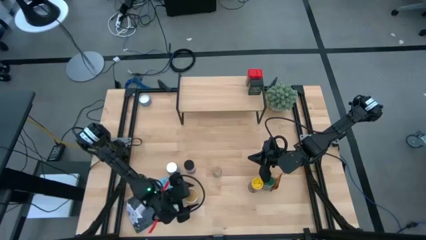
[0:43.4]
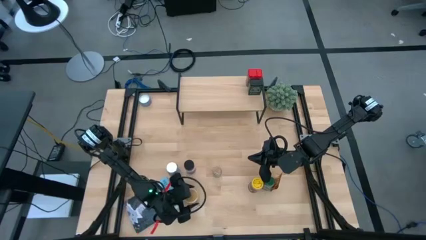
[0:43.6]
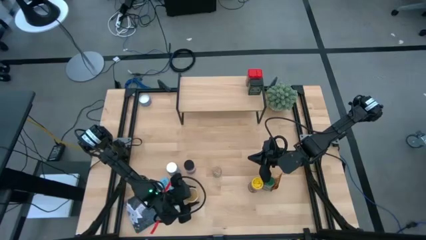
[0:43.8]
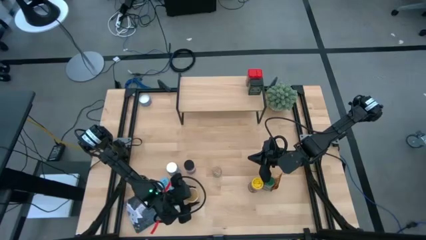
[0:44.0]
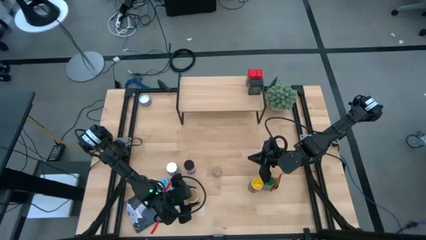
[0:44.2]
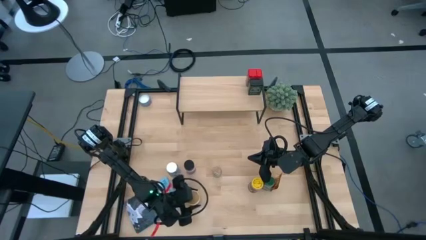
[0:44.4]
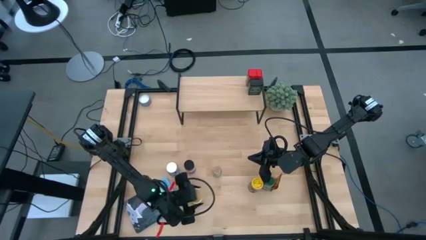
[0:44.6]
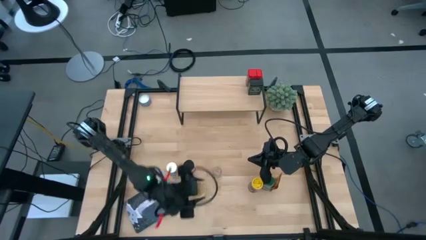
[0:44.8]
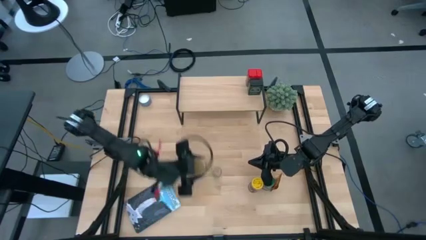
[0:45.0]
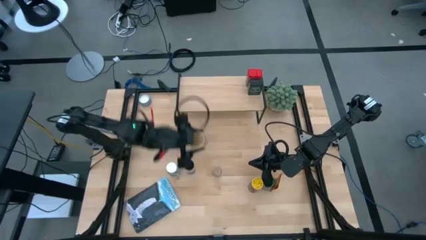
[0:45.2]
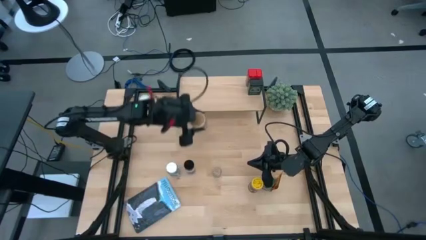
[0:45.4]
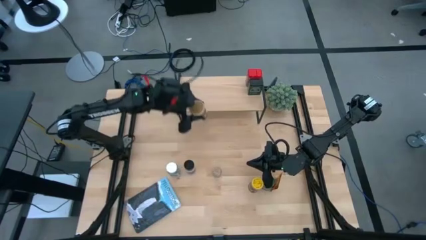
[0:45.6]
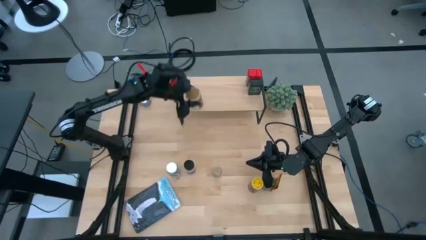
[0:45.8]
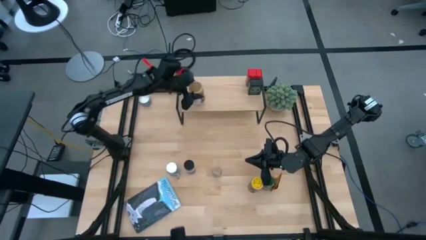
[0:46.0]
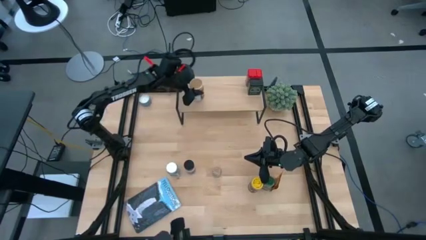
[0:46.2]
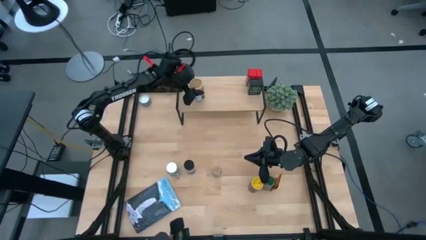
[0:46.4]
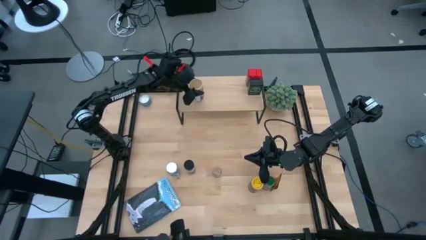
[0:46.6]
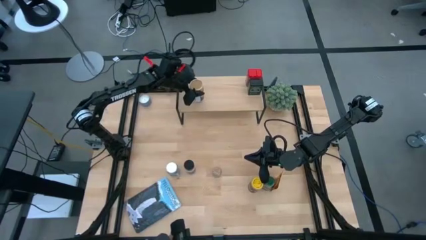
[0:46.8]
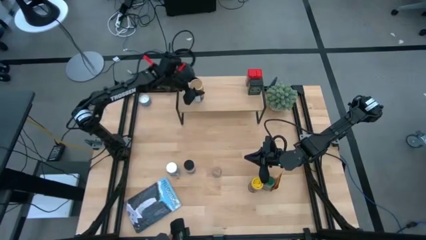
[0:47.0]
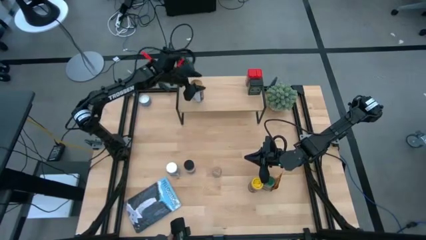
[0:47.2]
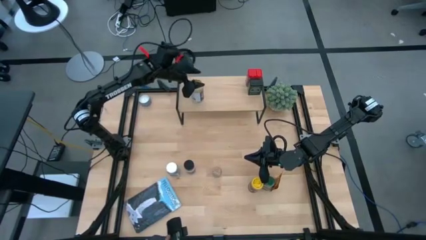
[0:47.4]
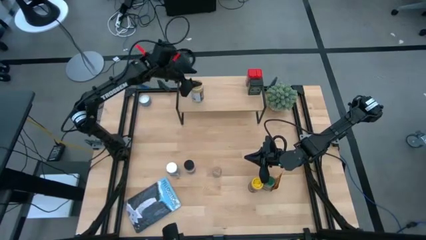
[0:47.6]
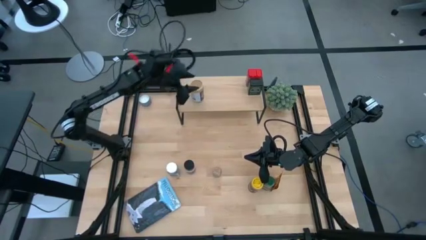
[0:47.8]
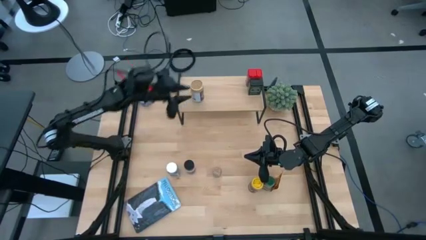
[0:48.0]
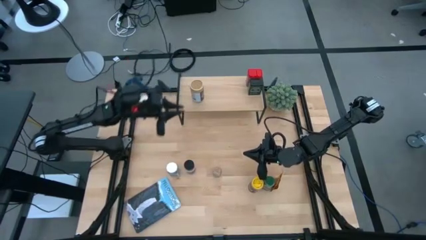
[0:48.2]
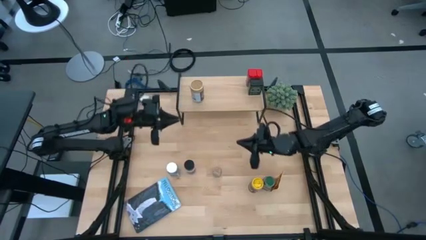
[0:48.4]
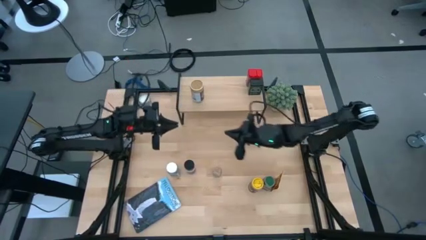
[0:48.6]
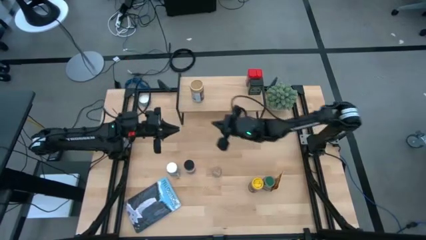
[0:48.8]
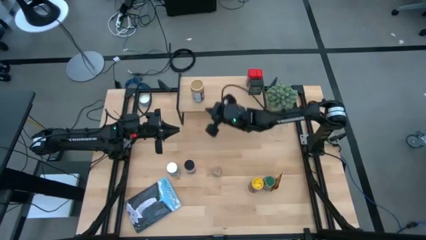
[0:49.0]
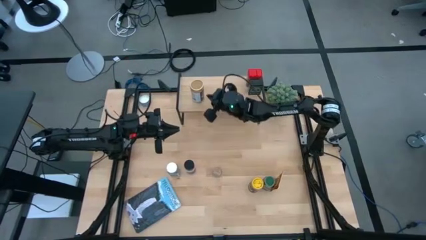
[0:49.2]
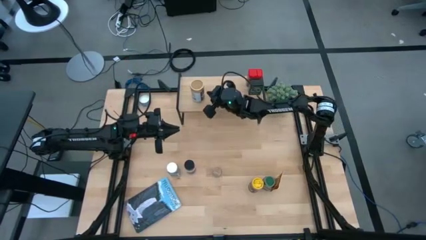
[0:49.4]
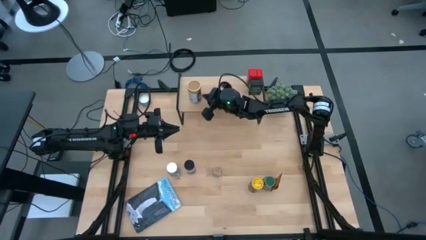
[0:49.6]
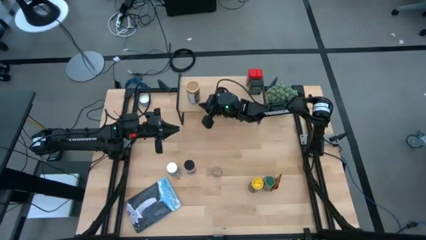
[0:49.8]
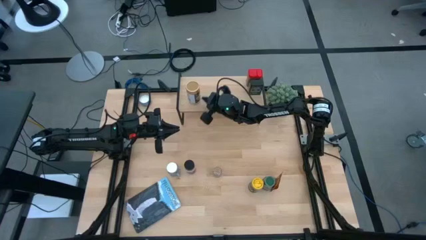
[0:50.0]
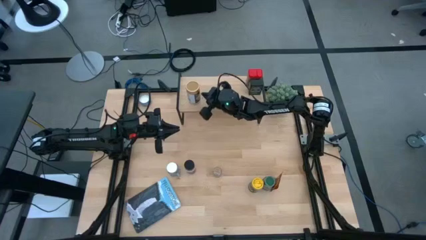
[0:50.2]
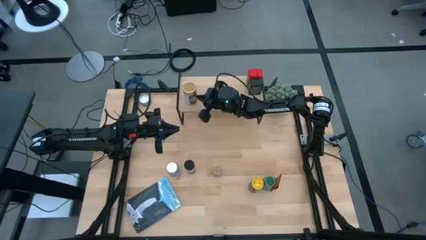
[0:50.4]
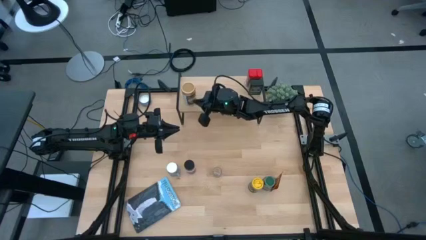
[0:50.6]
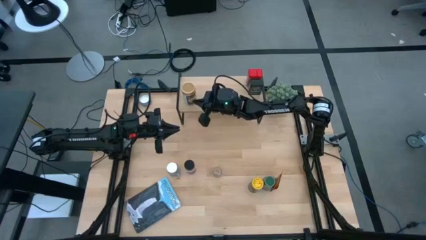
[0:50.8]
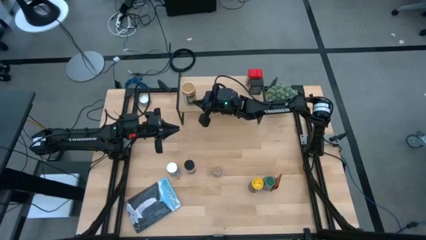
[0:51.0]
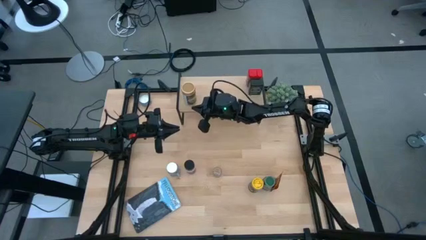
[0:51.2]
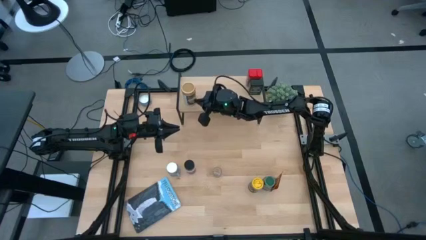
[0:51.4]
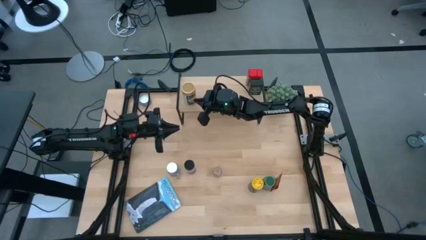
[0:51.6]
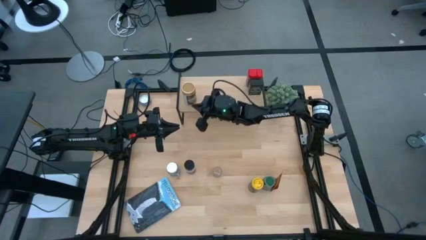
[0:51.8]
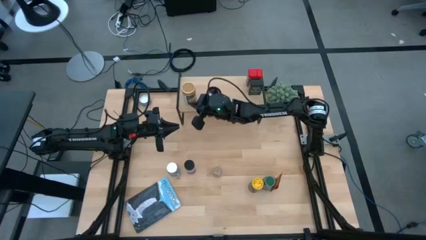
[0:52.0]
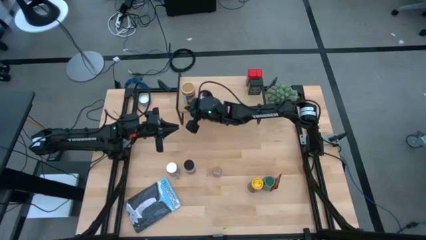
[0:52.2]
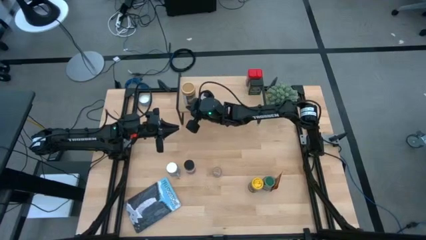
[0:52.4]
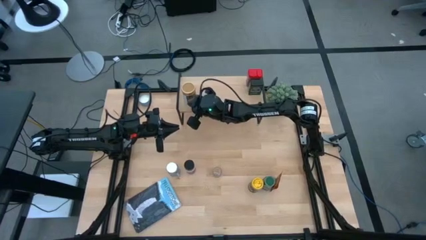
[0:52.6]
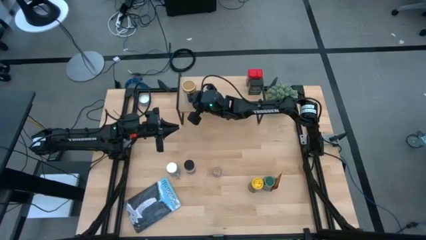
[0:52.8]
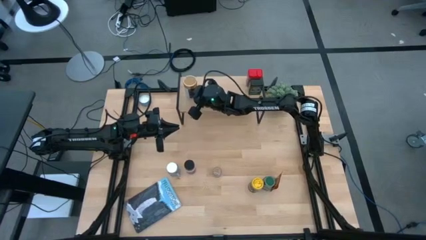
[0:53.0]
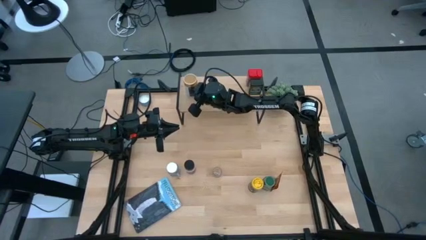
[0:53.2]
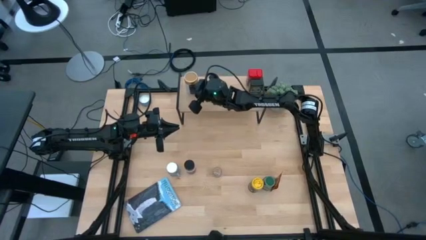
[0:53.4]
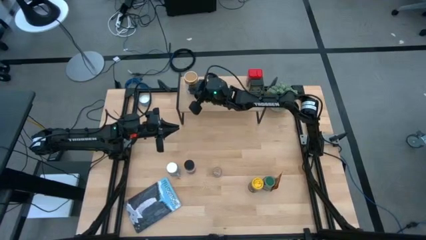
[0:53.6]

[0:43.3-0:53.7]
Task: Shelf spices
Put the gold seasoning bottle on the shelf

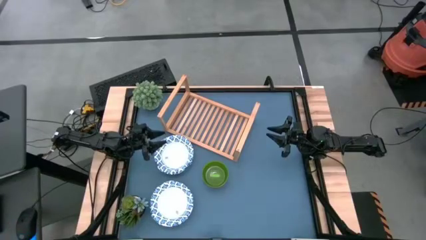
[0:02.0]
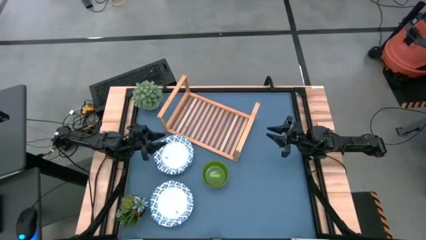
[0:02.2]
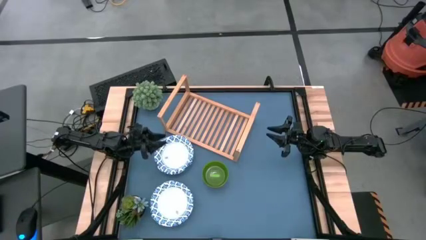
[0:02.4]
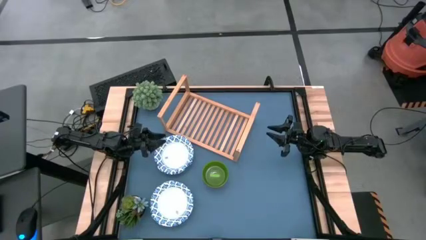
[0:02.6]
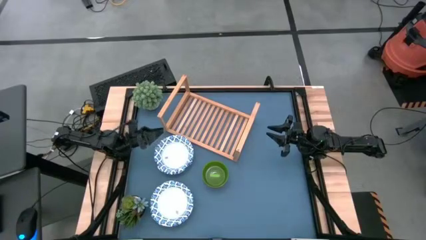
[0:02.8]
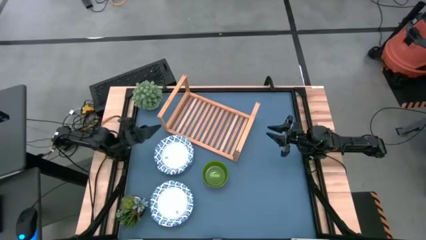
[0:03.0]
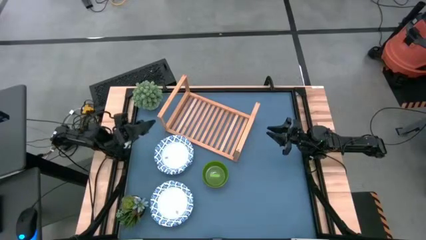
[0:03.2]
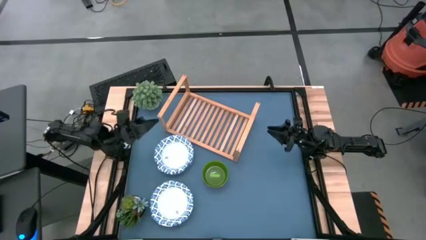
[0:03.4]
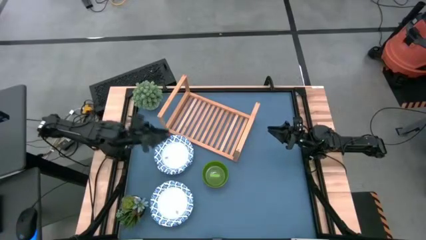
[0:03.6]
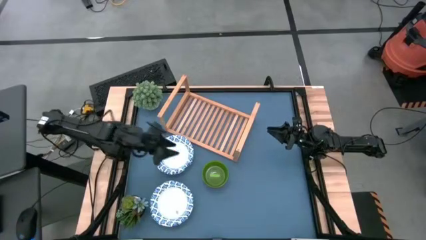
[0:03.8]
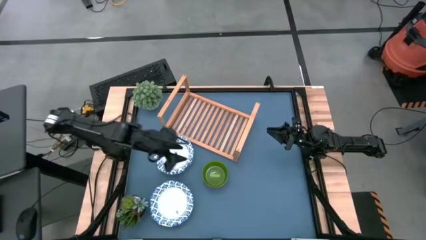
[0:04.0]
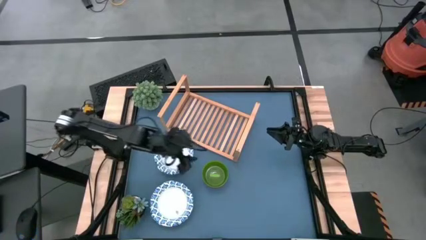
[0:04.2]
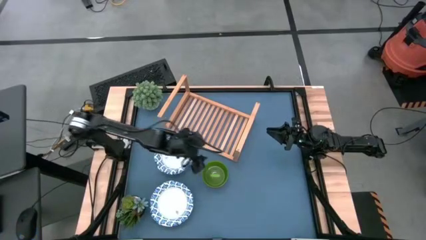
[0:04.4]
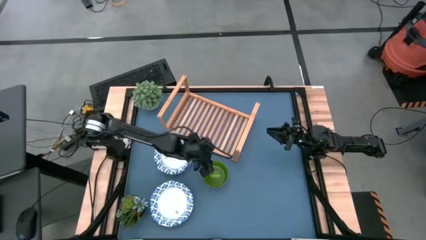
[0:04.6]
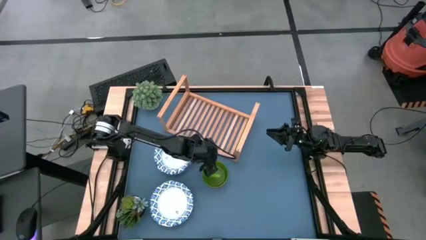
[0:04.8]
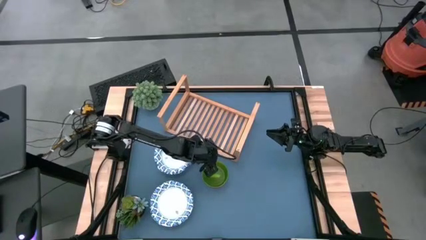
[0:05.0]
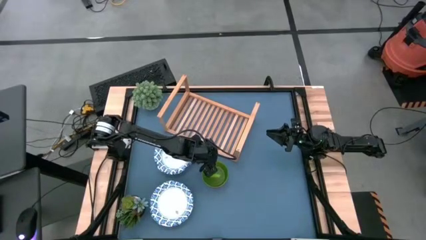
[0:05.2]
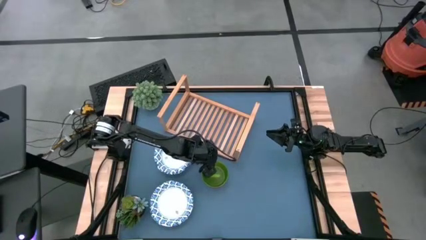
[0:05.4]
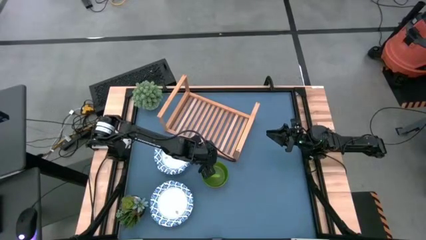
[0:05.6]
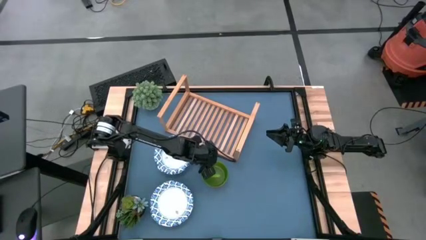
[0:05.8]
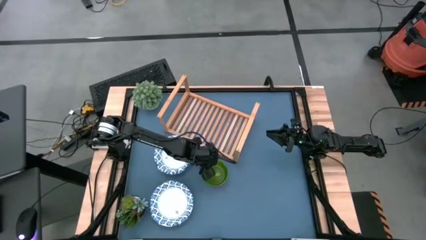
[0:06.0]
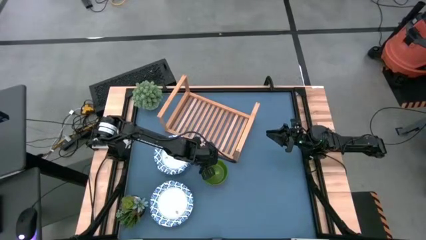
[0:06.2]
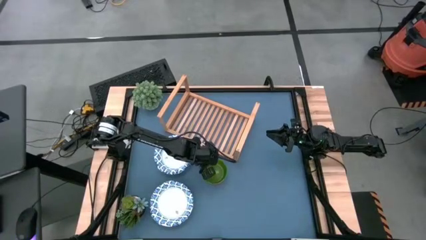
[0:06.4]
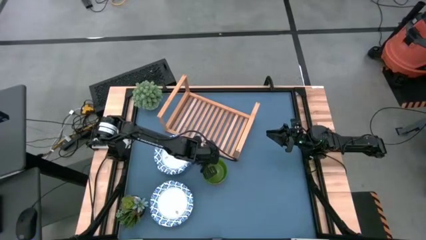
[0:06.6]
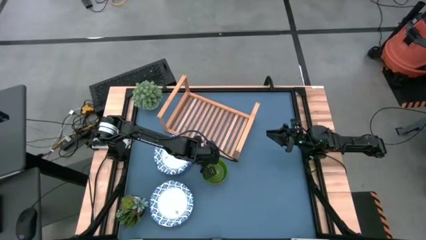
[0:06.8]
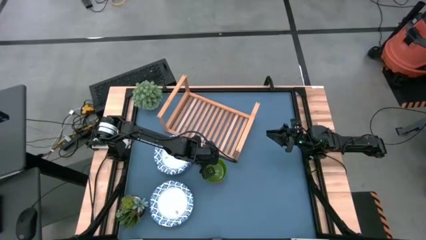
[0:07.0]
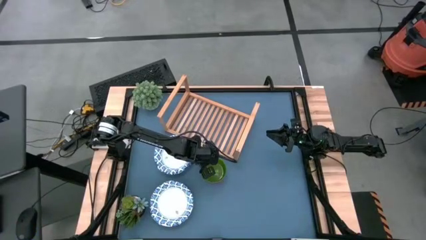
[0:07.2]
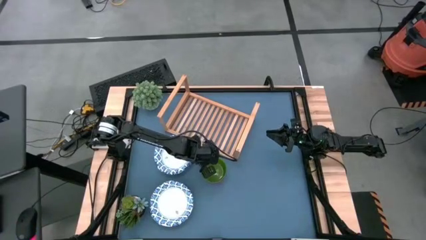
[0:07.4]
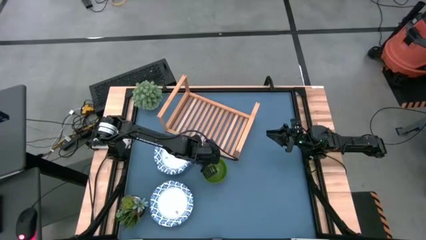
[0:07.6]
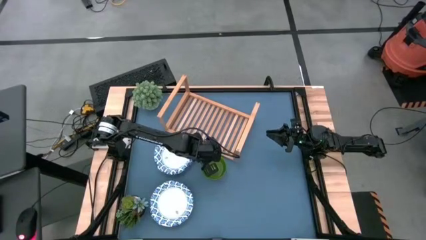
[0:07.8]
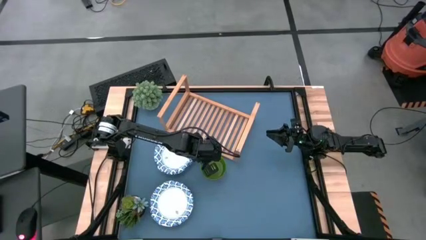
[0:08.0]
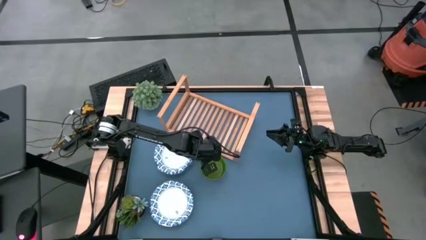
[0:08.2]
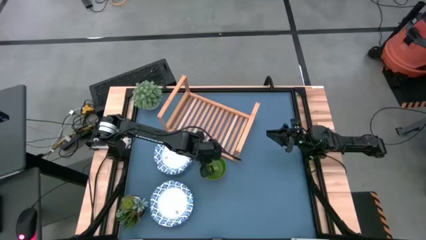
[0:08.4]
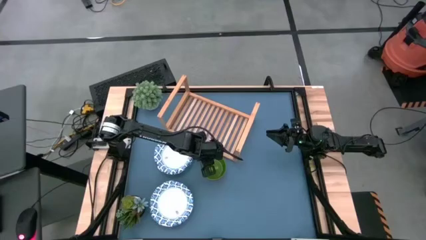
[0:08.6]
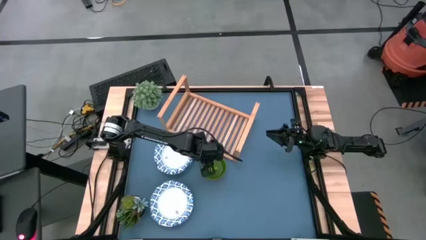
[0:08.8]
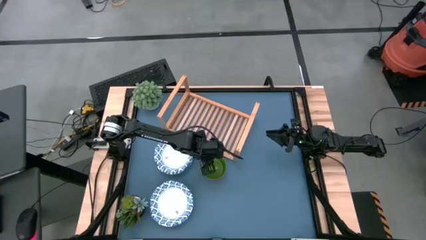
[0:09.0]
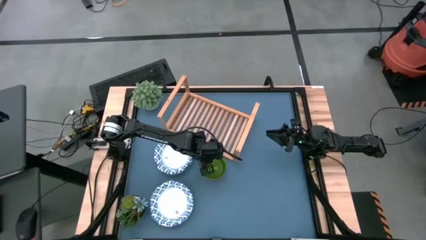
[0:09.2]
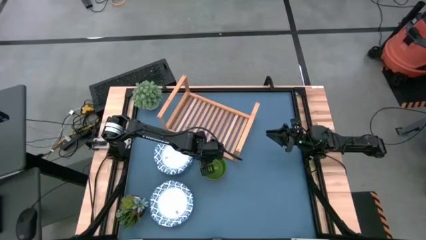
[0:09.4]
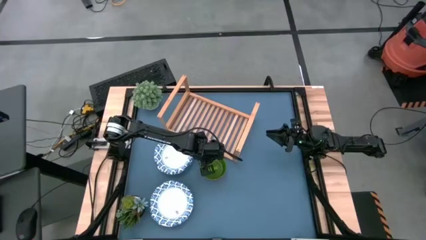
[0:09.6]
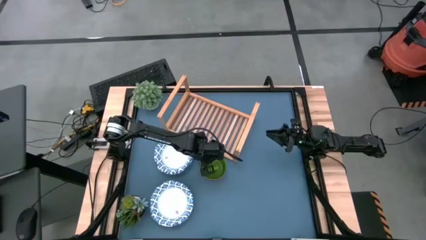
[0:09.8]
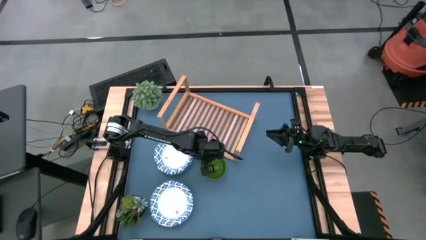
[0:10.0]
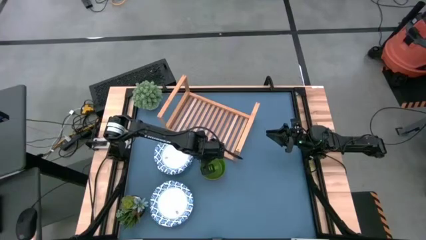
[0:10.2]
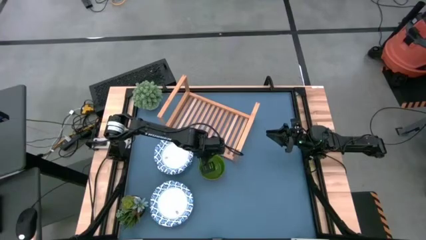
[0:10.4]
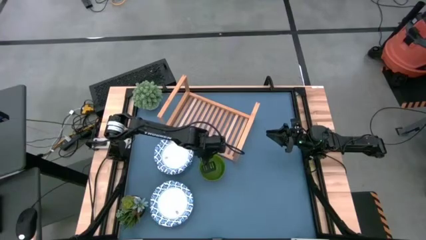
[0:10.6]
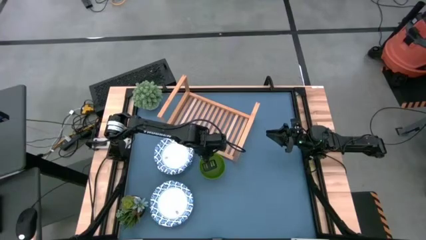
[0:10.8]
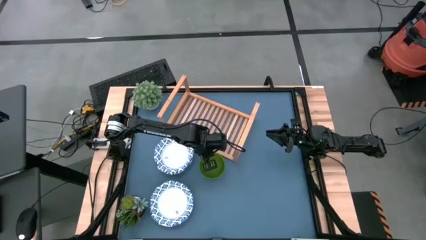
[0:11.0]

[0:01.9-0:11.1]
Task: Place and stack bowls onto a shelf
Put the small green bowl on the shelf
